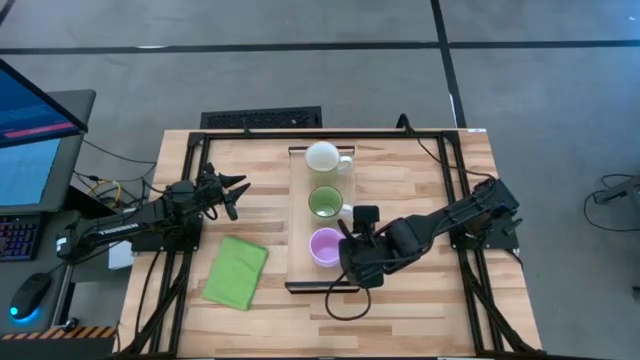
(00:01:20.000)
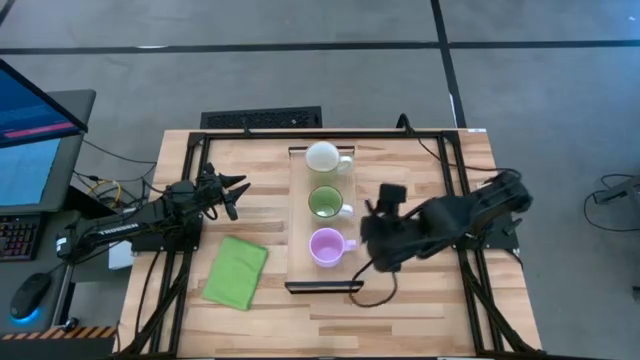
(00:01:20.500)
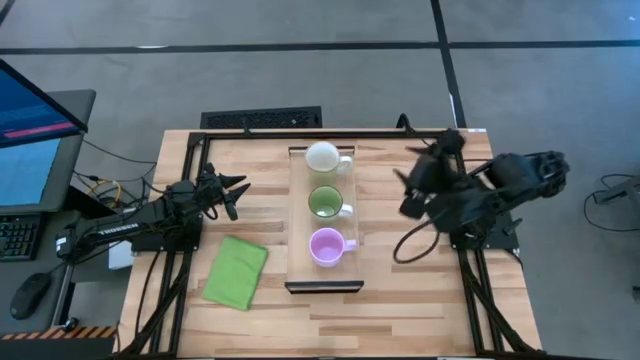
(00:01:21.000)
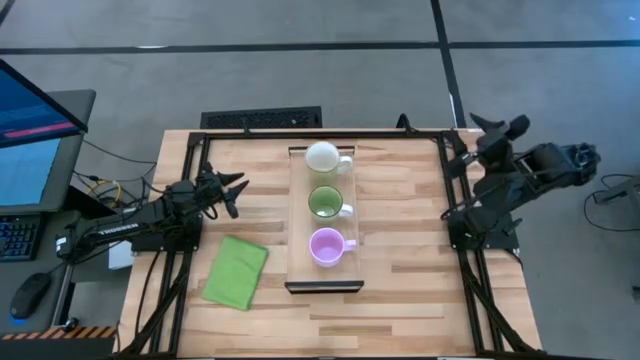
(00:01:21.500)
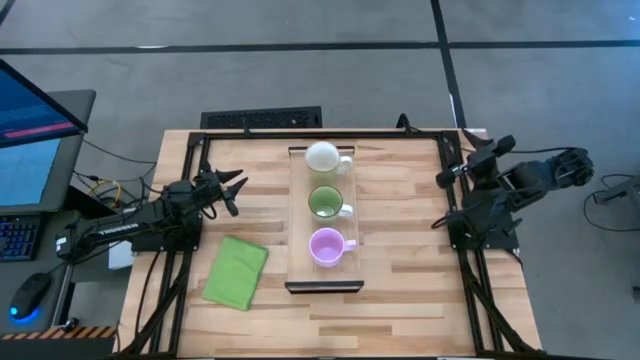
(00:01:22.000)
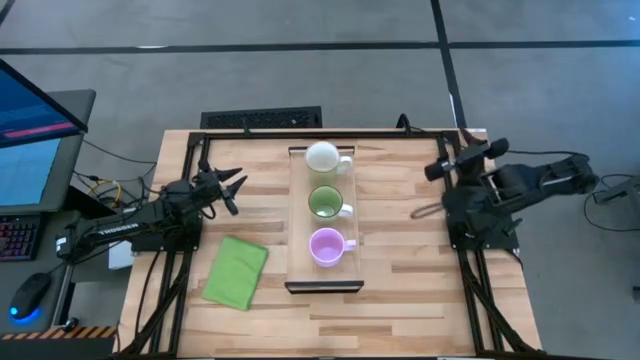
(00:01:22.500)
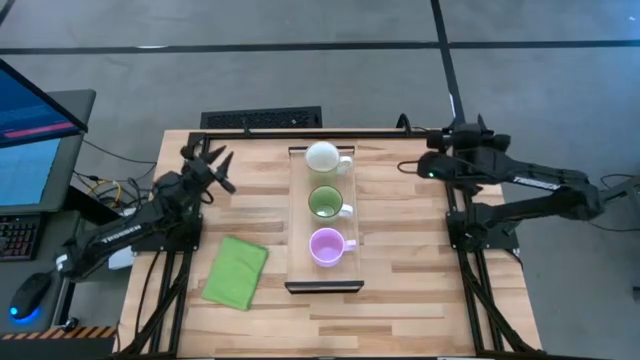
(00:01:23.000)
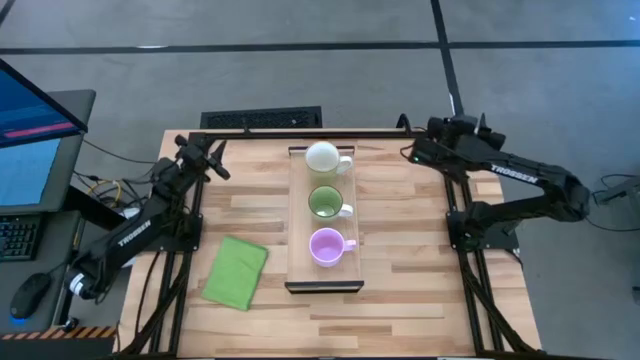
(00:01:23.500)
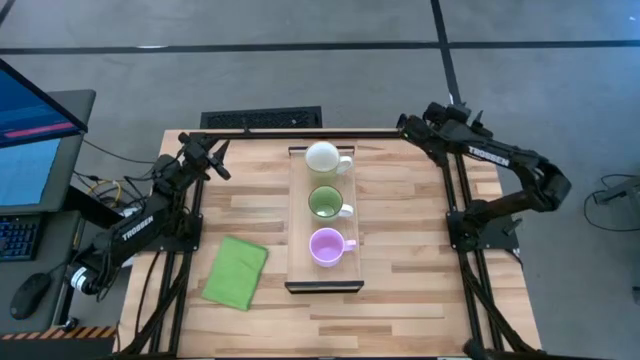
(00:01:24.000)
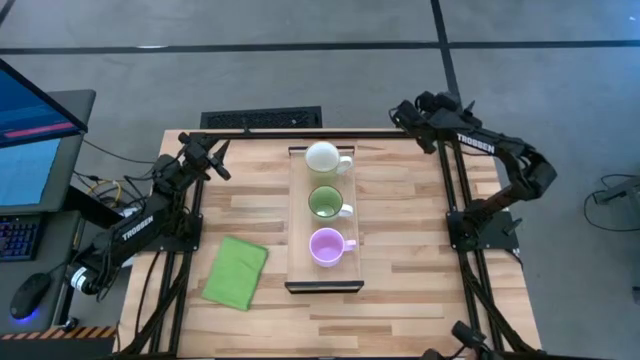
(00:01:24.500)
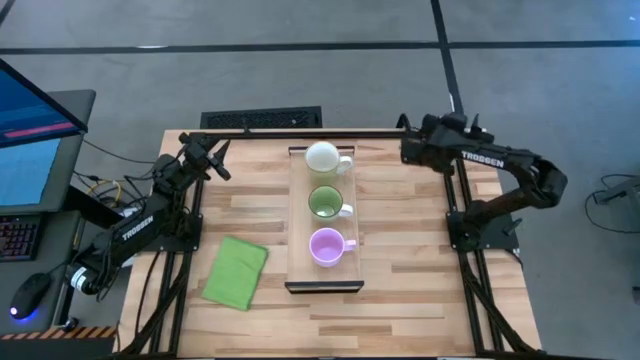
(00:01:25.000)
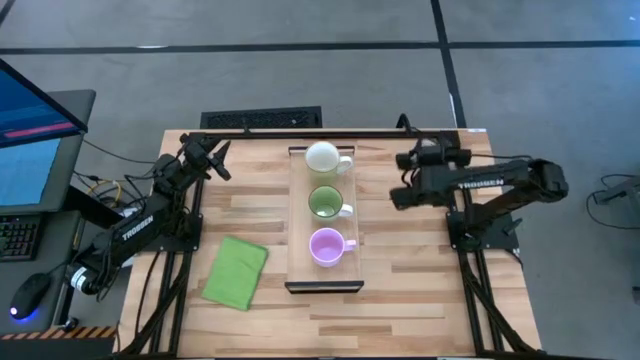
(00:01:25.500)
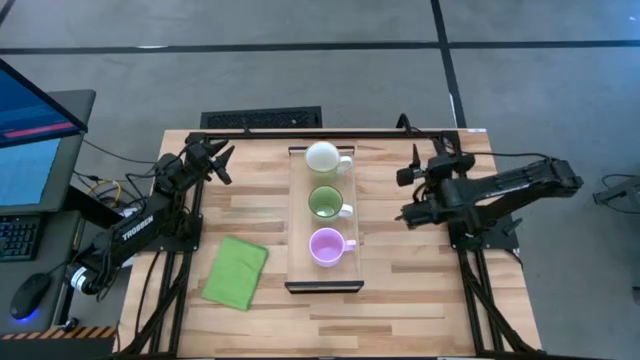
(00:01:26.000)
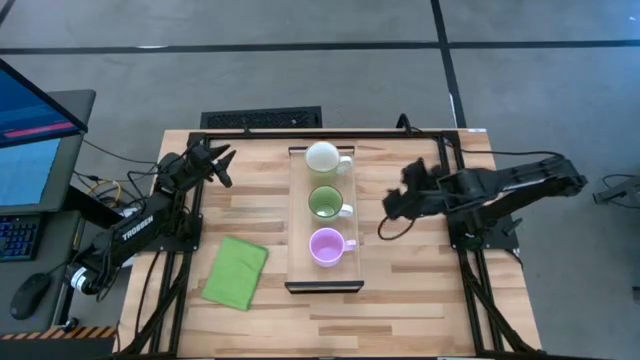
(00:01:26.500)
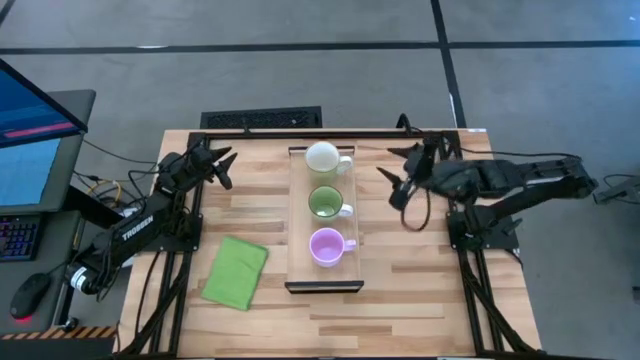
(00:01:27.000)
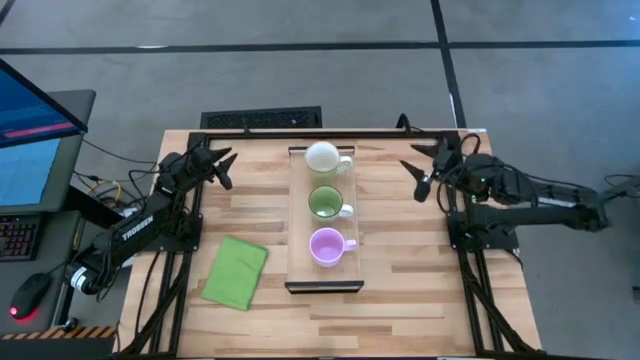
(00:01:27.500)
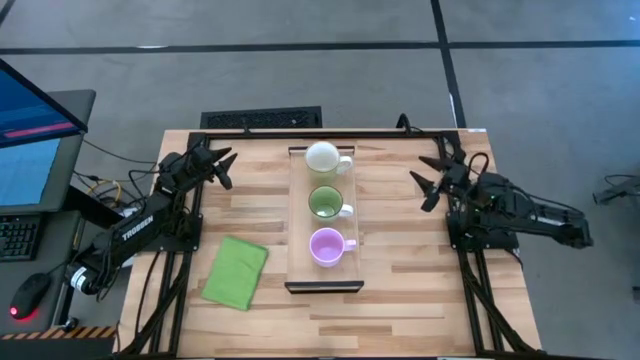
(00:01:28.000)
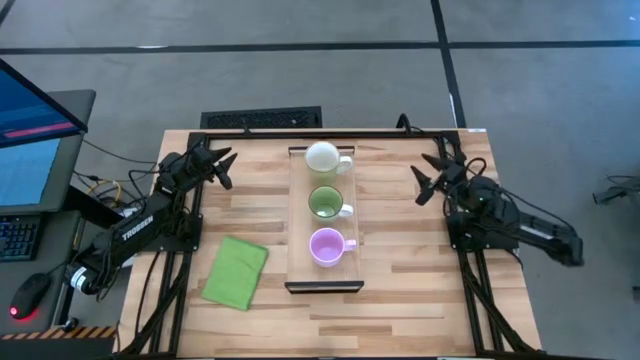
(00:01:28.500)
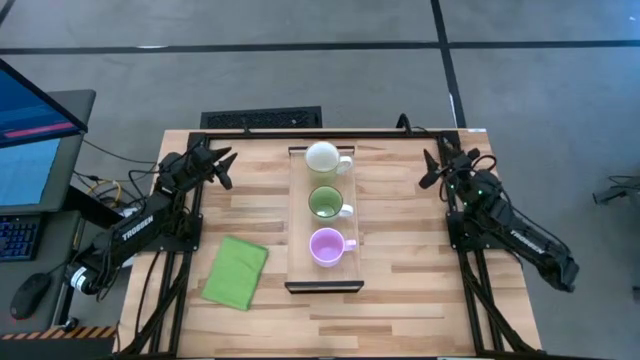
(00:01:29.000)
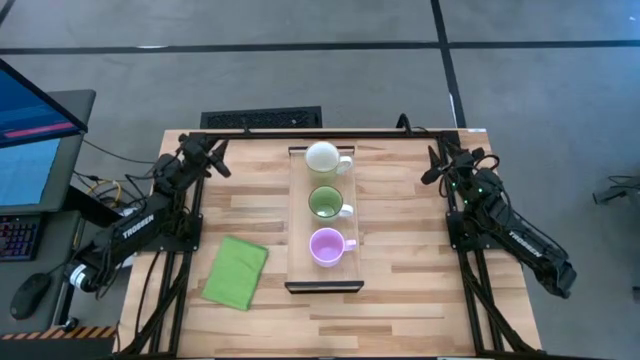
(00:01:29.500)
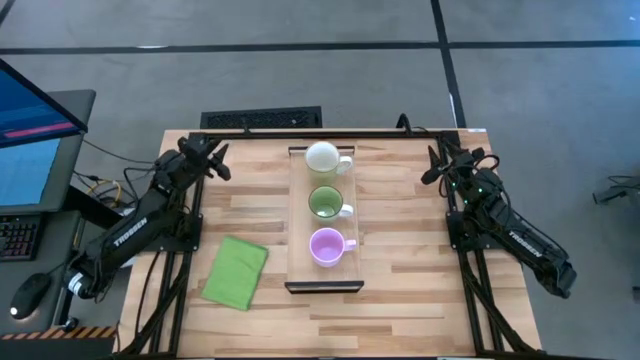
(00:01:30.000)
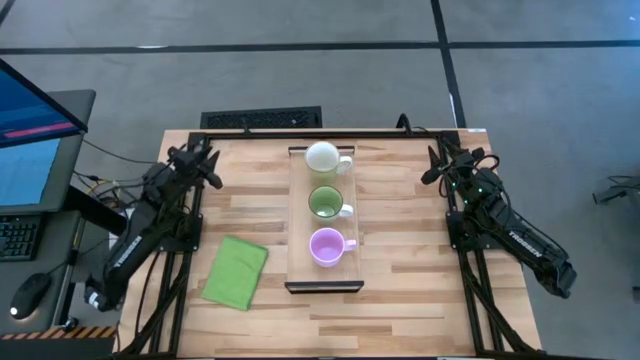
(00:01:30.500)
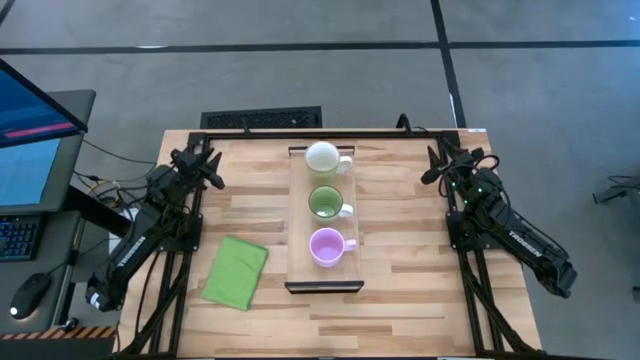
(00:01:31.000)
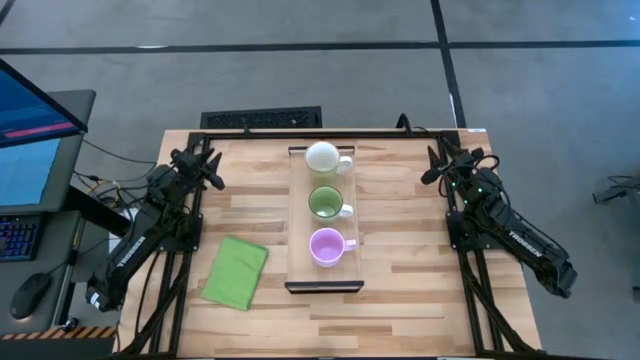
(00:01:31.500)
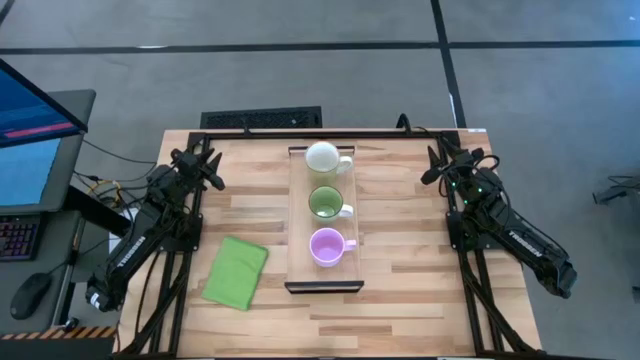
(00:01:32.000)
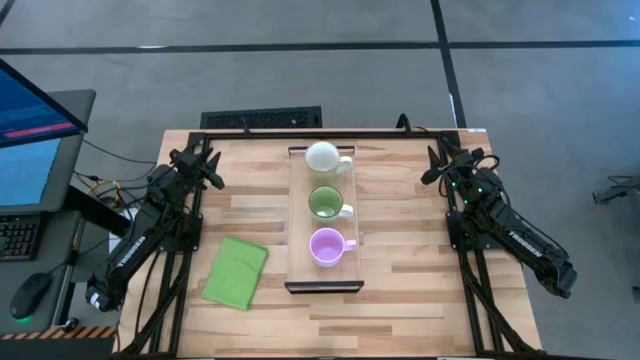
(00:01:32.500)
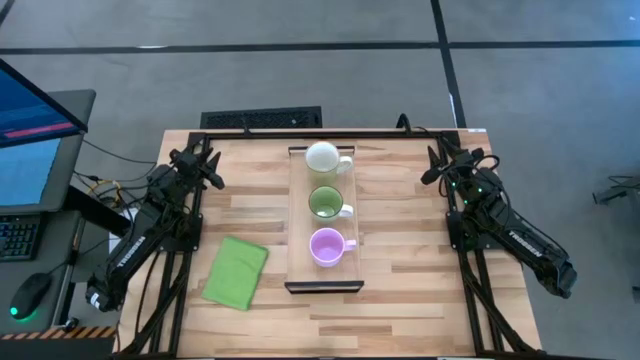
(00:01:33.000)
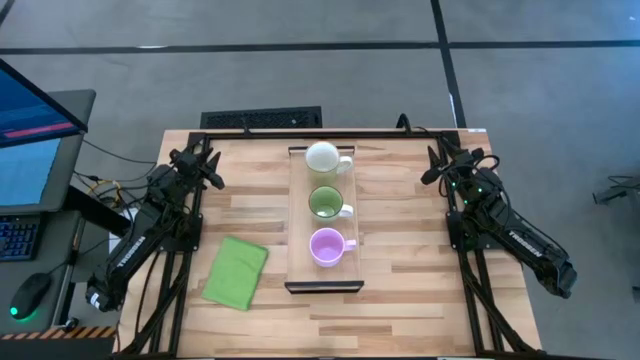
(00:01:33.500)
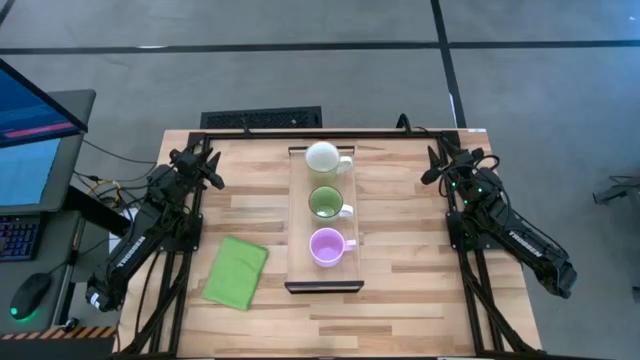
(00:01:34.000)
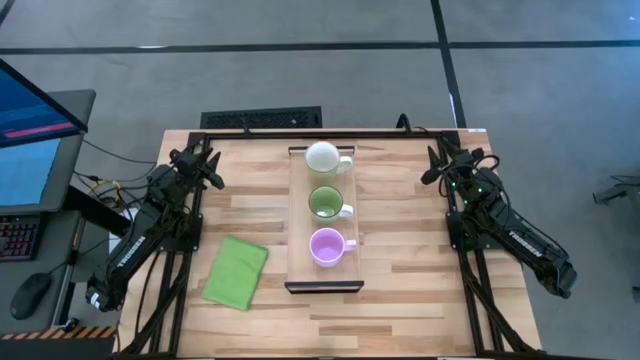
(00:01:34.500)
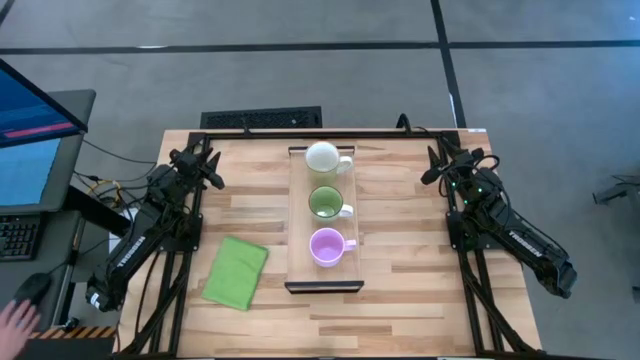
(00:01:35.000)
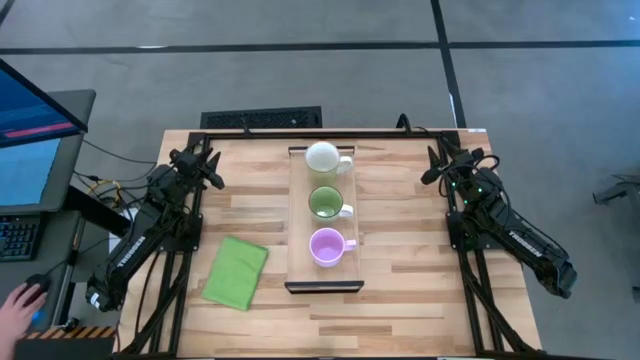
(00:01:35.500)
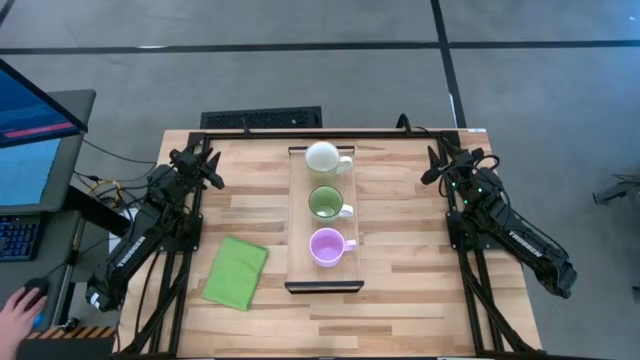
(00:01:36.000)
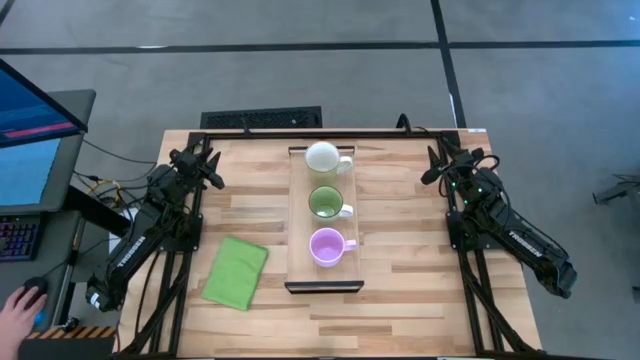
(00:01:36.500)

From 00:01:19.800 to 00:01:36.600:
Task: Stack small to large cups/mugs on shelf
Return to Home Position

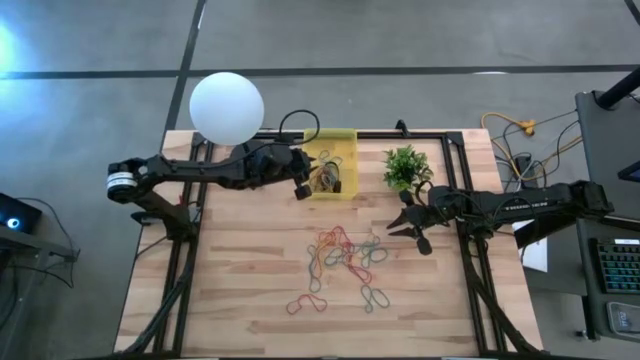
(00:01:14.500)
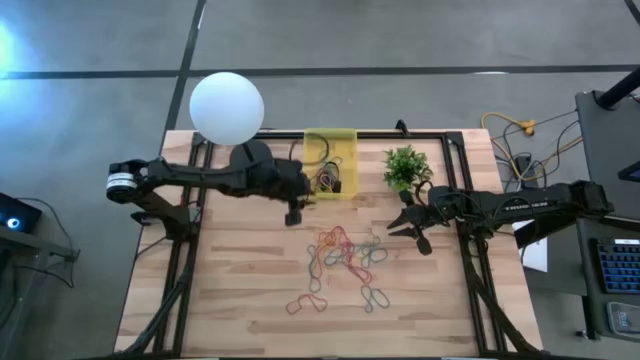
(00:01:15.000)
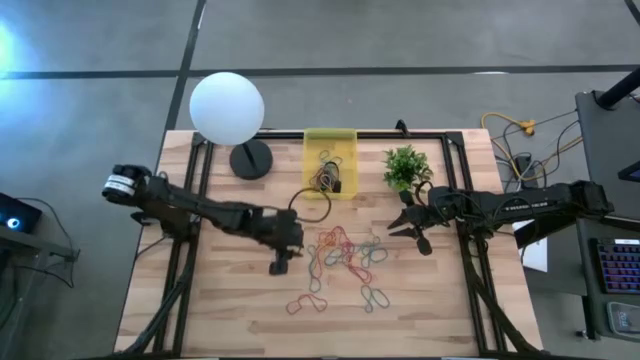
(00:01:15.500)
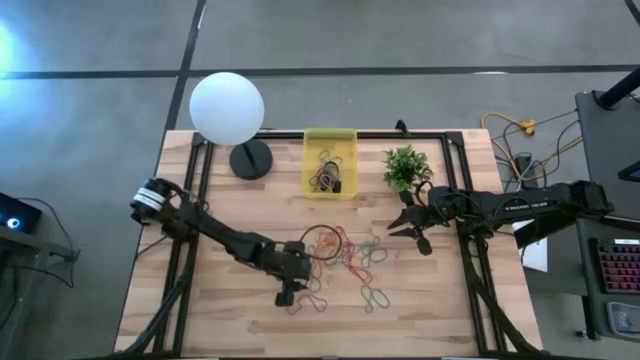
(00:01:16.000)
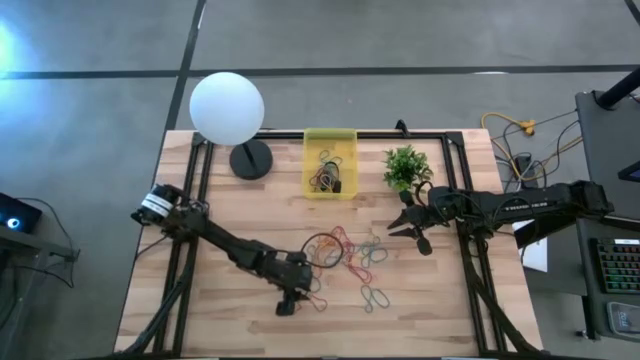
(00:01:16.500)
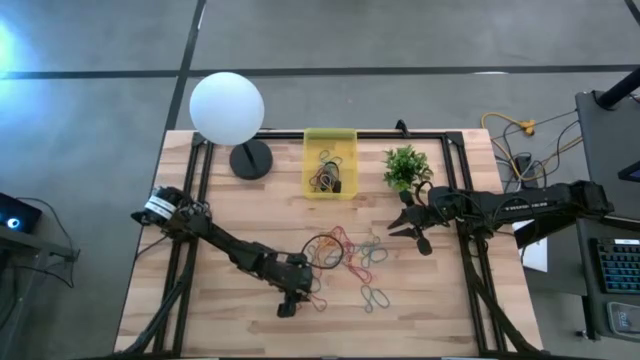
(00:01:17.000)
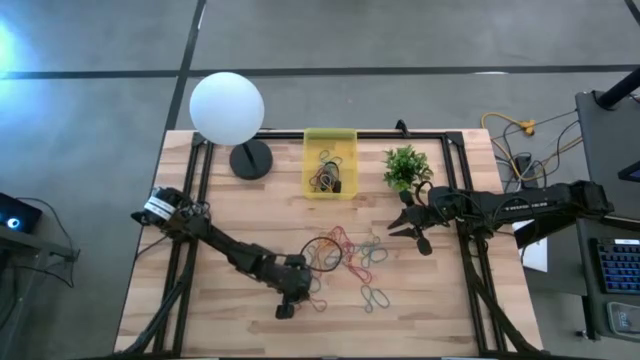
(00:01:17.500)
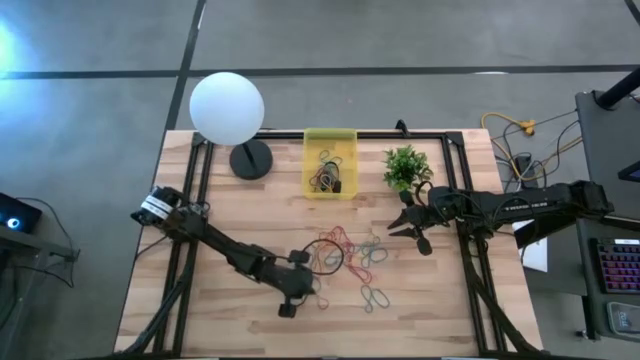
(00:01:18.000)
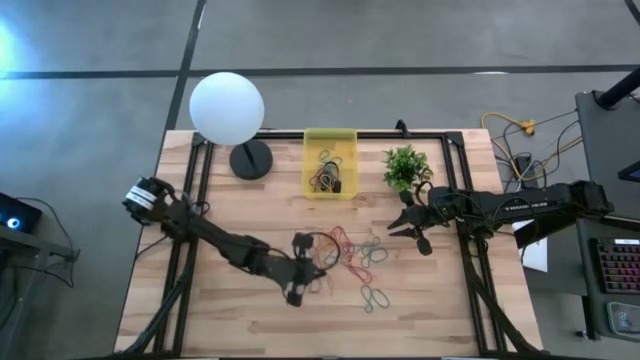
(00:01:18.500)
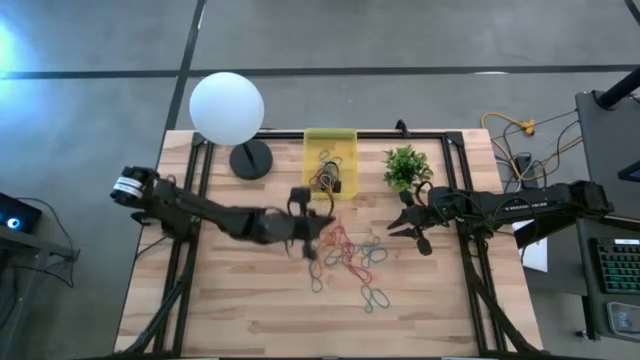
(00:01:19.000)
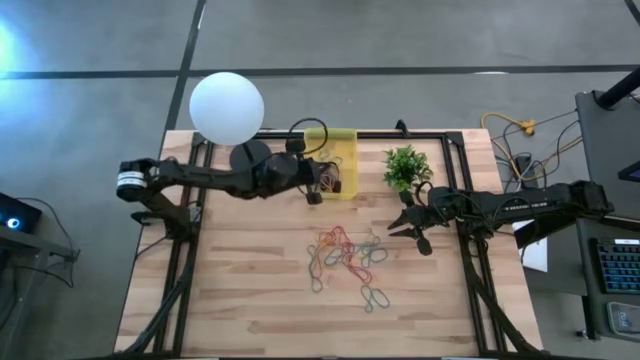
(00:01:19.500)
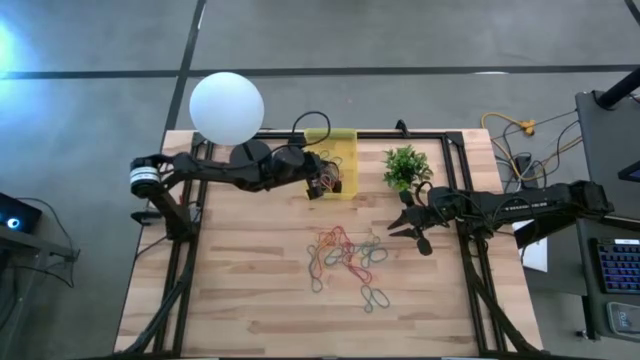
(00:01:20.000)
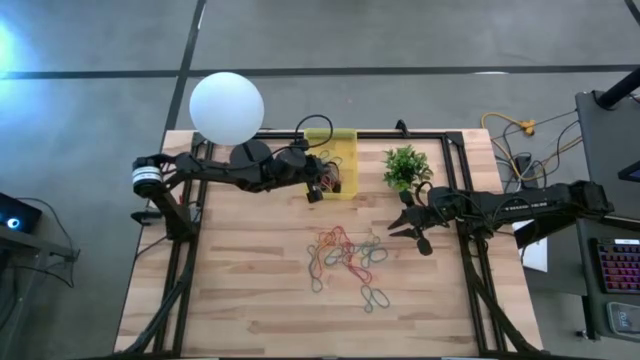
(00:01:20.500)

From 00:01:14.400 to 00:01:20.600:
Task: Pick and place rubber bands into bin
Put the red rubber band into the yellow bin
